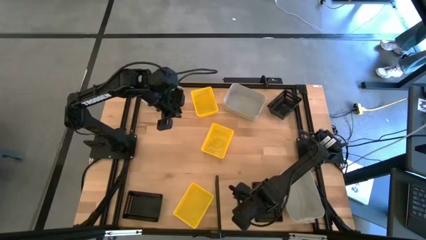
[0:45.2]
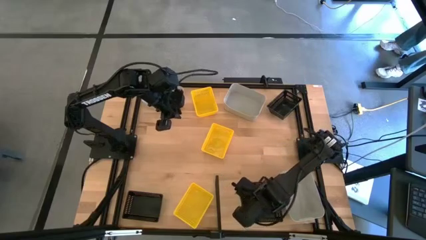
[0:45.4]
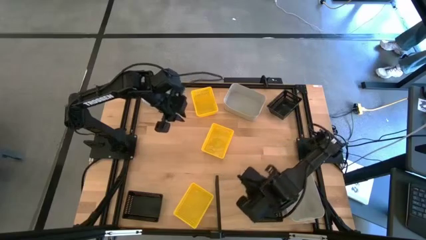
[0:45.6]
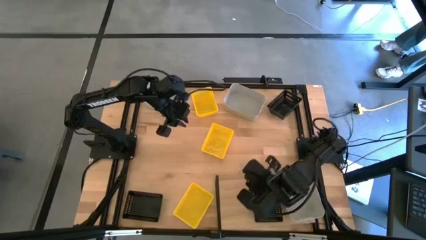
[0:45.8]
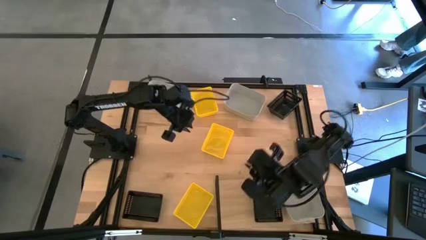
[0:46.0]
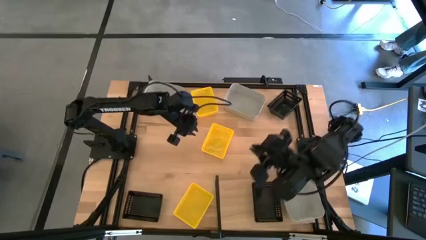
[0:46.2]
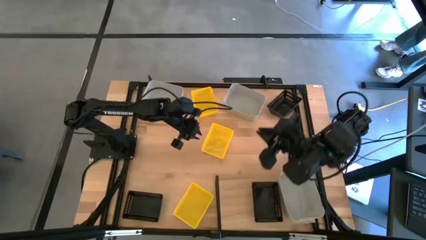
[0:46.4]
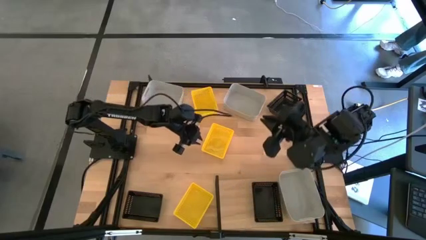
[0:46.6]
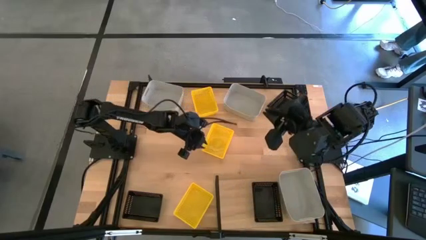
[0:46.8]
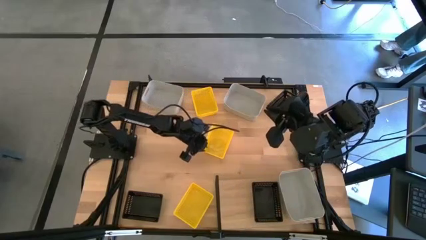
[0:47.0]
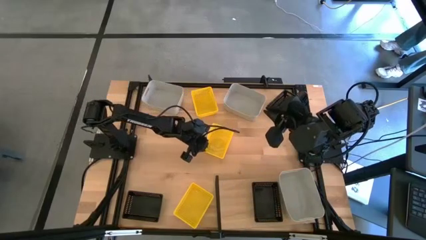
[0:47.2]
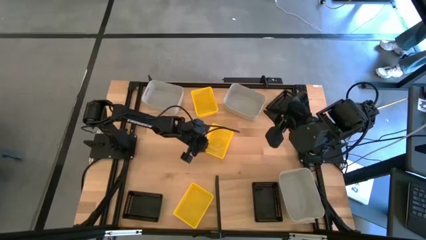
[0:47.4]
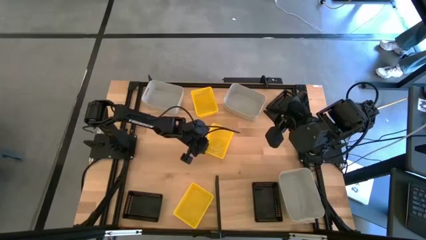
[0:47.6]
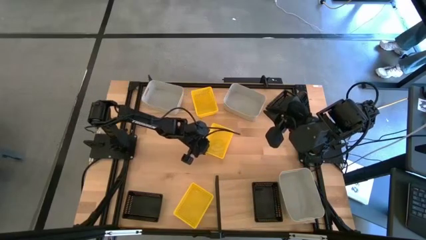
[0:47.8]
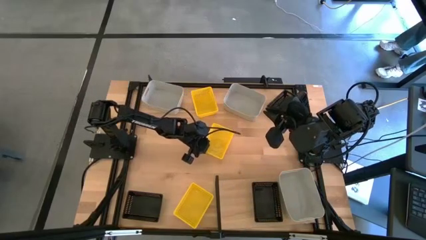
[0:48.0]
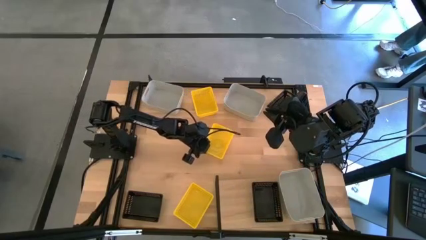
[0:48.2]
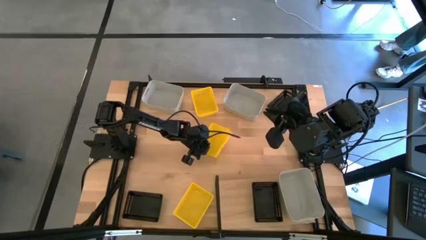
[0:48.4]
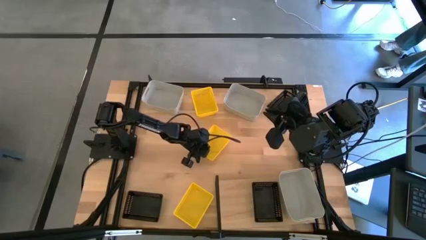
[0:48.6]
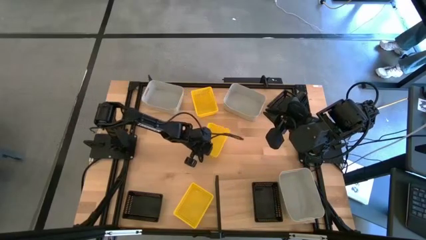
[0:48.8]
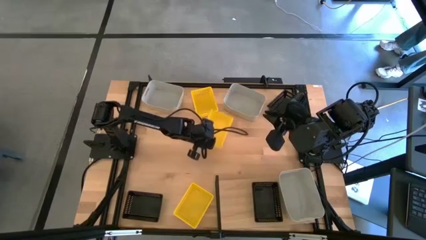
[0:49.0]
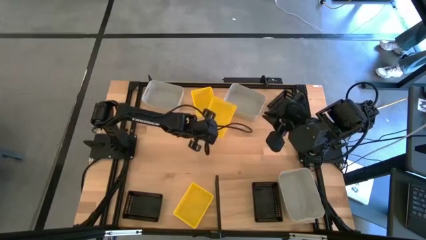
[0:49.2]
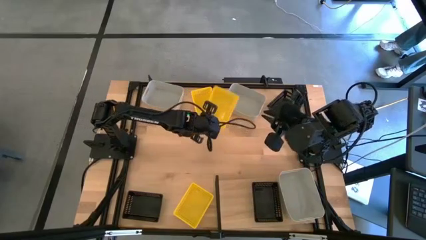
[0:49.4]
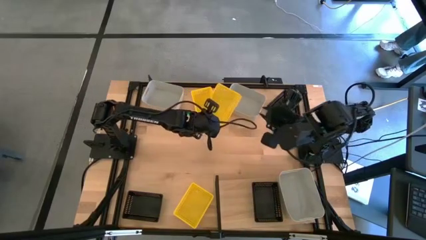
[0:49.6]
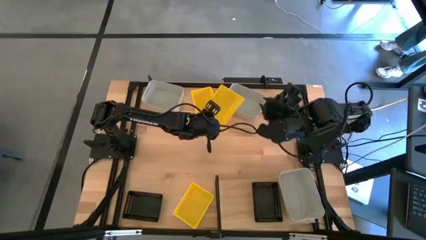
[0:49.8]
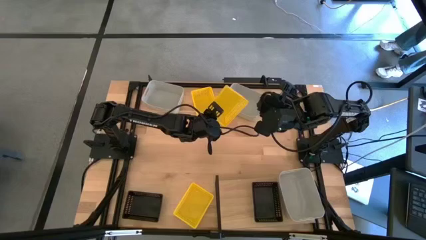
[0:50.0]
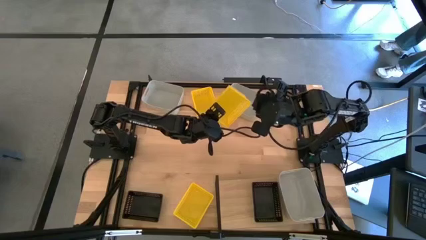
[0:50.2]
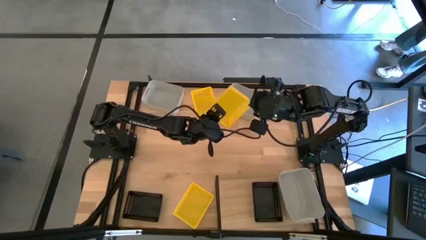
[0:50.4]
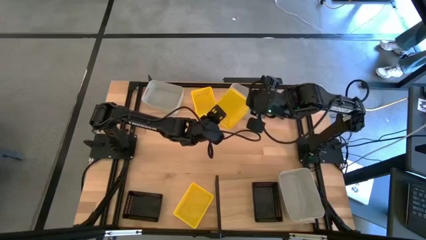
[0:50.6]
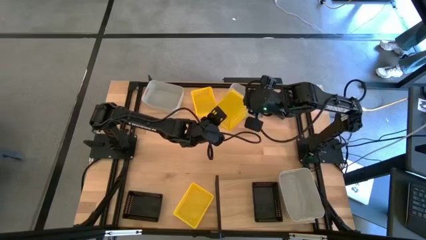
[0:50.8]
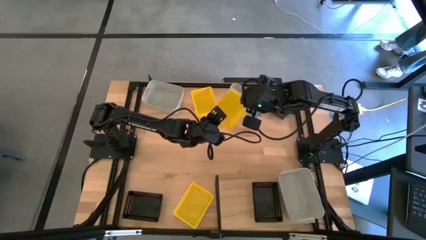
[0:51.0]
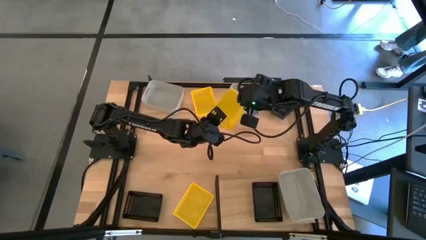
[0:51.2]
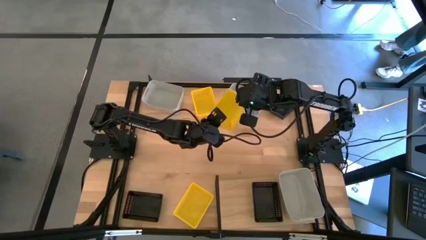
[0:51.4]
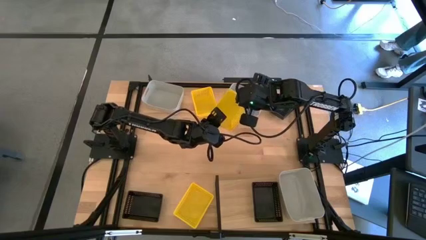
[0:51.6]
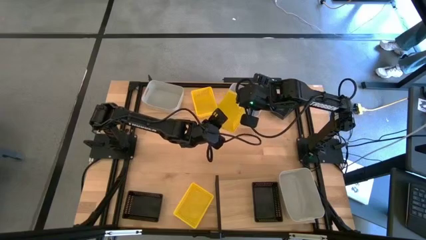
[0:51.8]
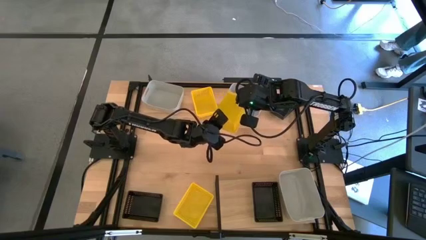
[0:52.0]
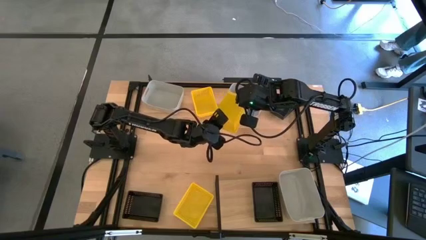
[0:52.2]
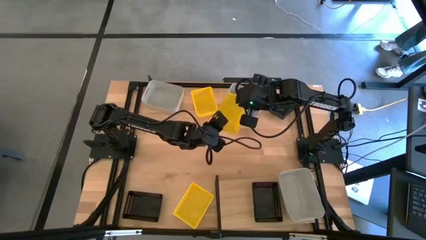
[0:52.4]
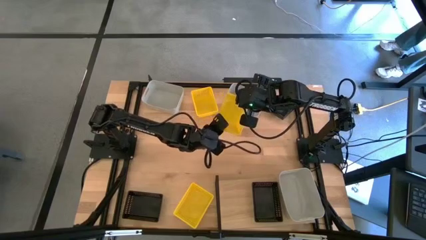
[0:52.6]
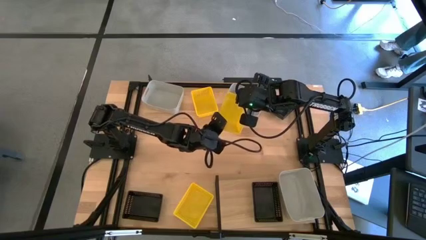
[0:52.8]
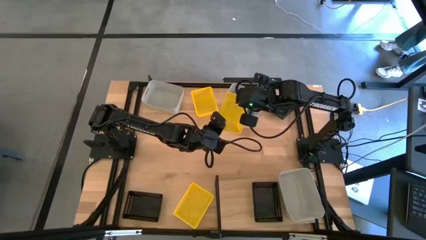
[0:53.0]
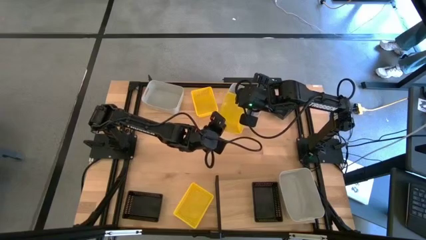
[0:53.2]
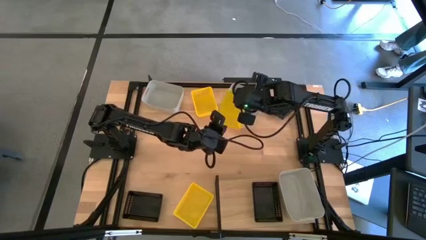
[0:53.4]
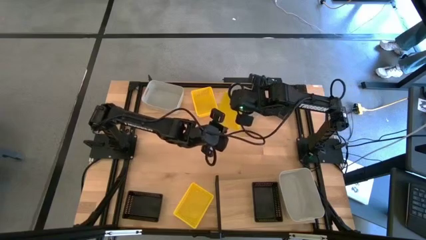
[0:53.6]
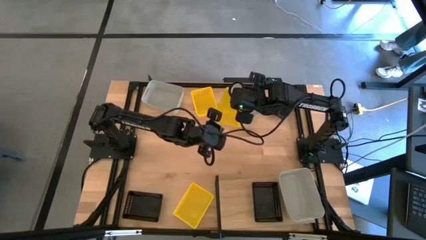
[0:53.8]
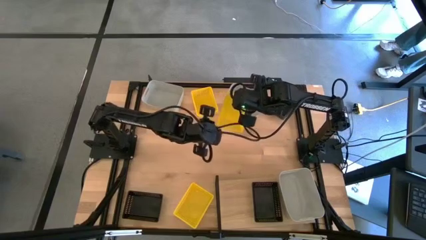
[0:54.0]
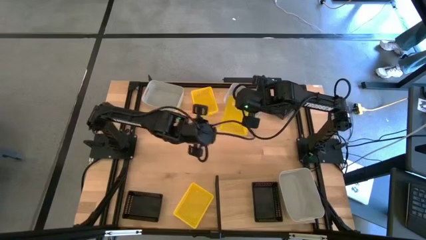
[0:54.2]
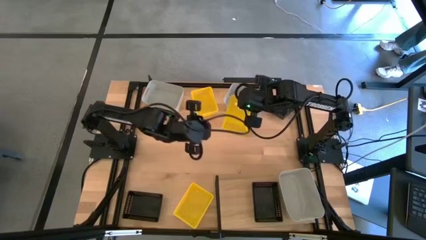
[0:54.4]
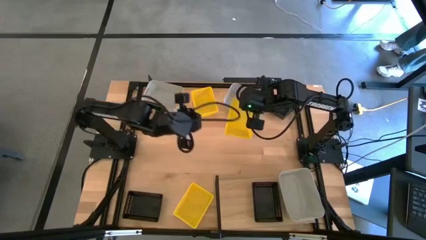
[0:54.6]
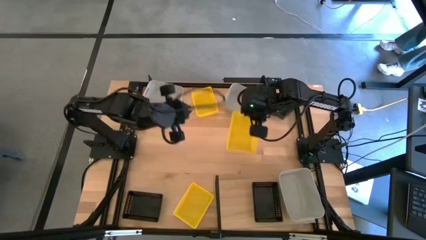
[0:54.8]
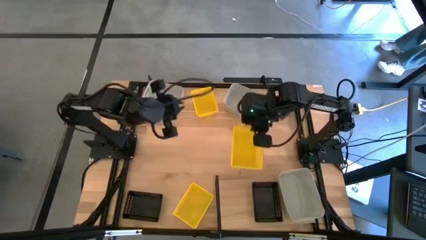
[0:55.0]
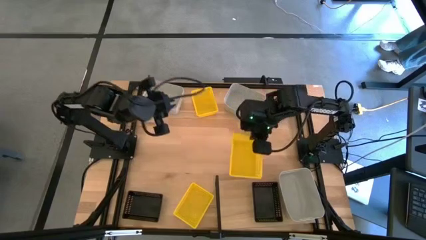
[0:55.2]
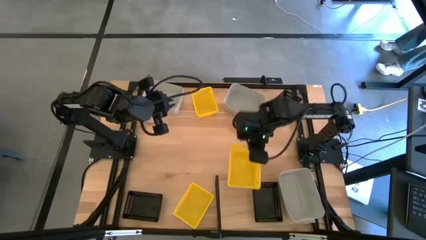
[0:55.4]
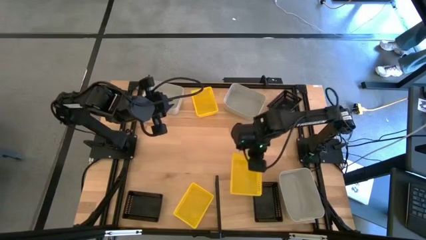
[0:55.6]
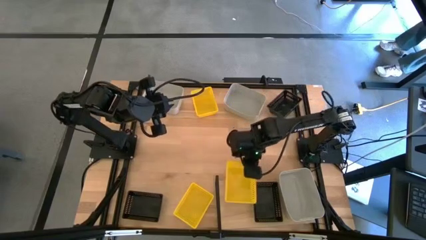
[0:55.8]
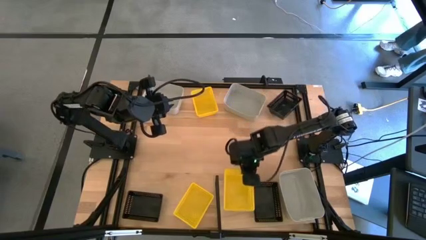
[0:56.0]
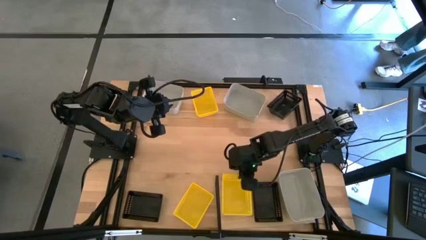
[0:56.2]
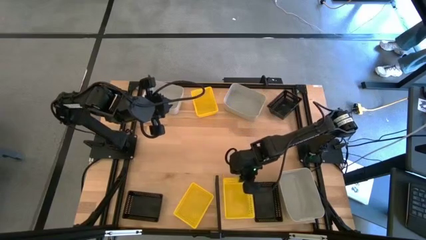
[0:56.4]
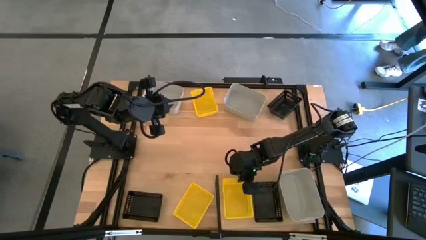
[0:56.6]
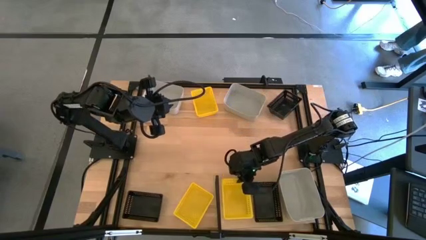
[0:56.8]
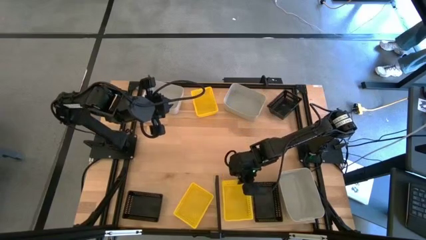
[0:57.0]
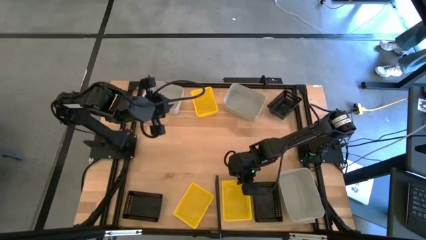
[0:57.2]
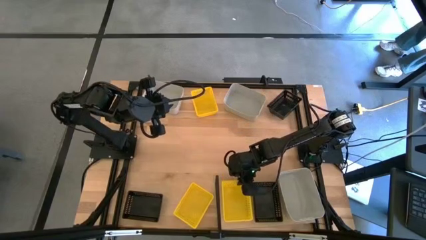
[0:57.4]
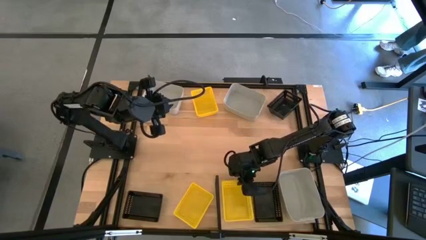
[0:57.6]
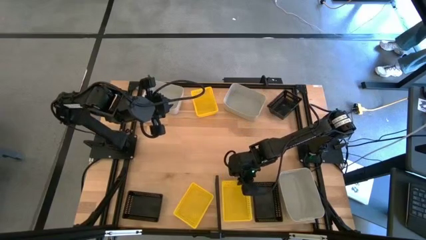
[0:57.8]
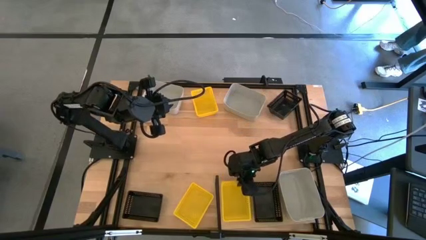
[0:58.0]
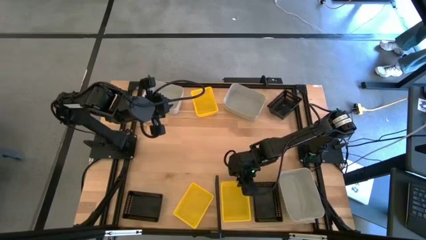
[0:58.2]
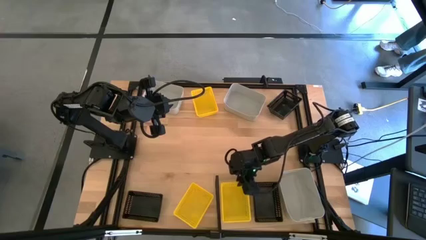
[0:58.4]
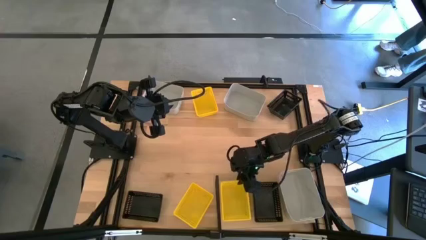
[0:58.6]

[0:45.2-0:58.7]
Task: Stack baskets on shelf by color
Put the middle yellow bin on the shelf

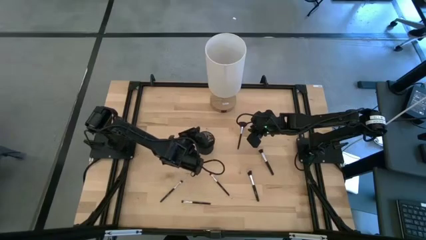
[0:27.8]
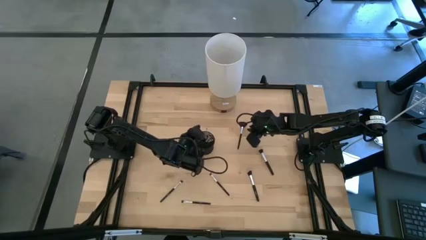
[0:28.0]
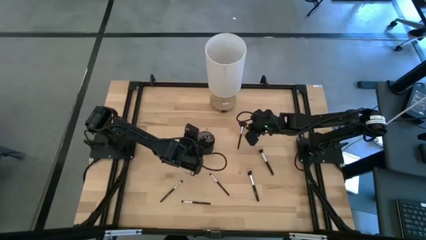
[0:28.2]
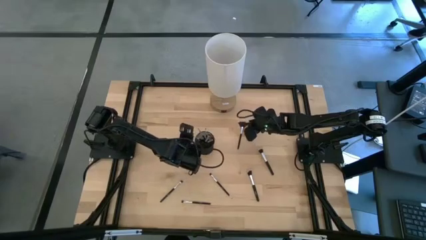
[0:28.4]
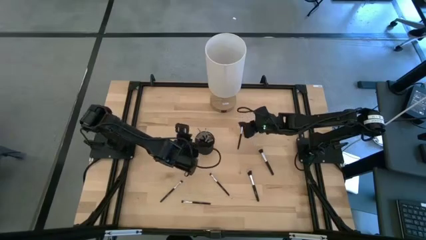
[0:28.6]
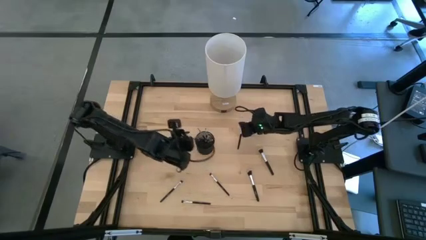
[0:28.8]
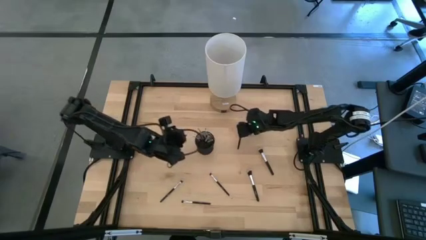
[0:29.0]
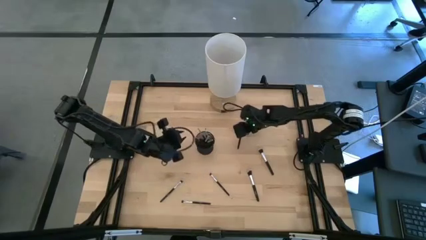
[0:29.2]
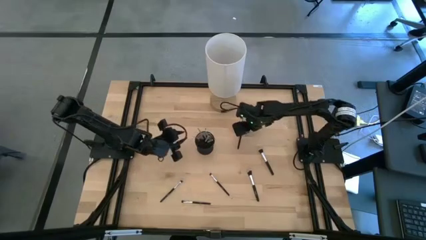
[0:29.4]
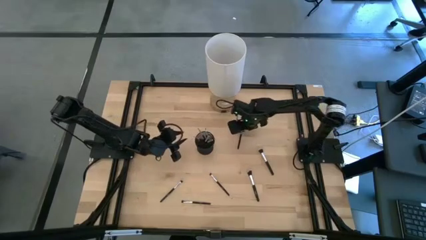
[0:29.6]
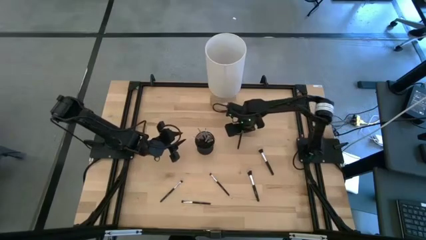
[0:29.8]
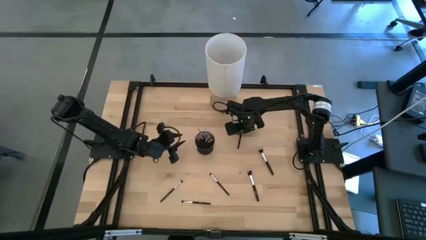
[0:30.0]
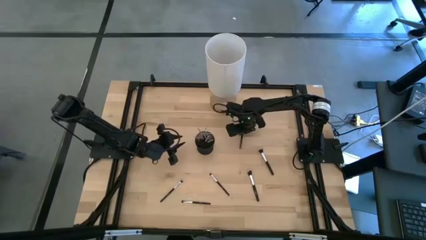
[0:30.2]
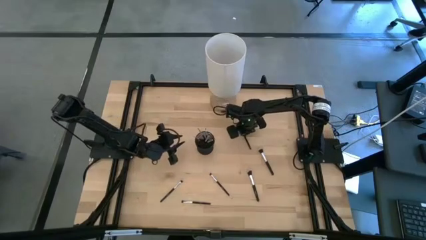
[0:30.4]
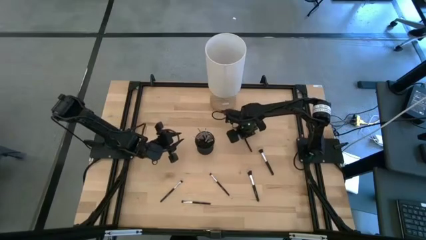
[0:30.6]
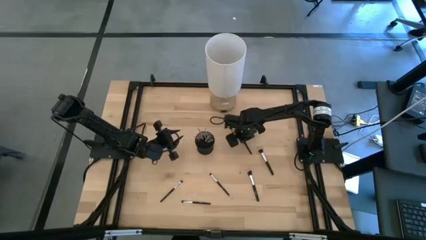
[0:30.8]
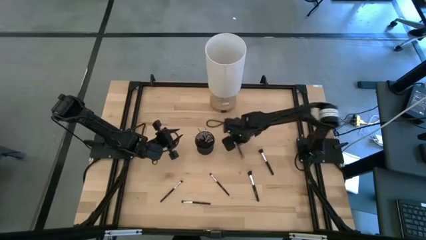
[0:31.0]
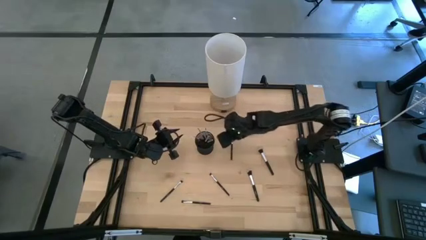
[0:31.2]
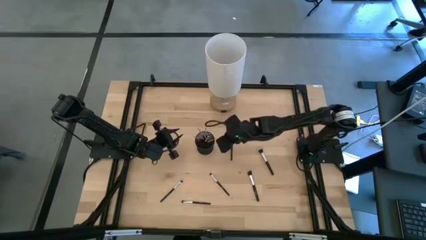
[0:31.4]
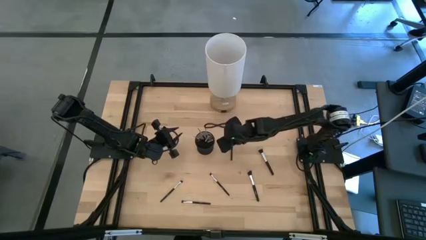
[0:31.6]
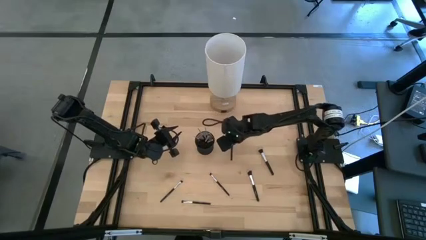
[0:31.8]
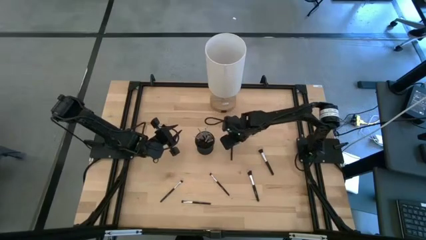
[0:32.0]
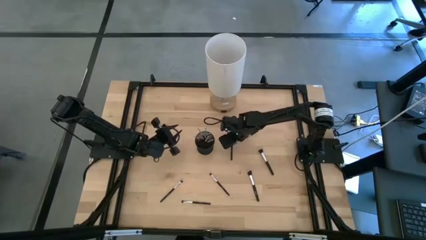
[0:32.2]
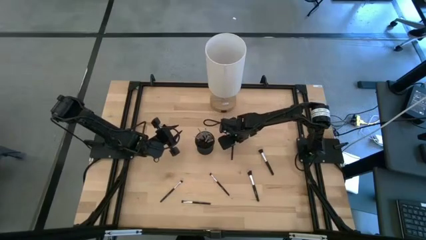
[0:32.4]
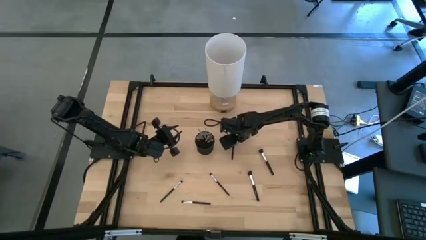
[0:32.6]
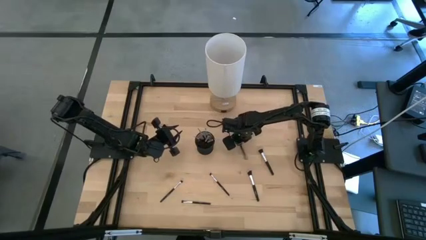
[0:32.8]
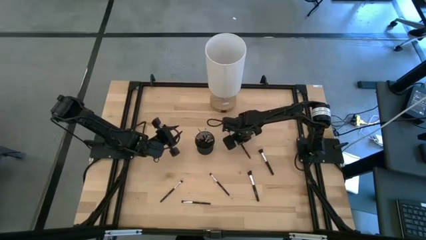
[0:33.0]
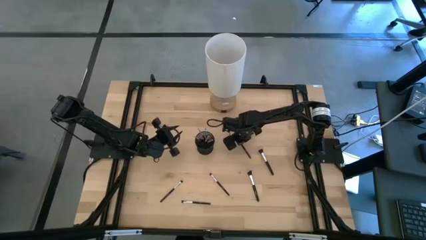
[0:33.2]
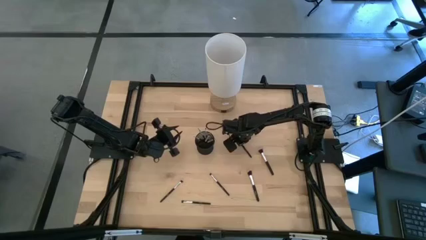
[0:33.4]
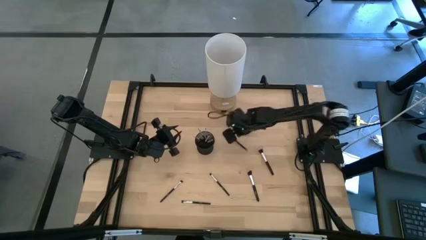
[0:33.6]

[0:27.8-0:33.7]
Task: Put items in baskets/containers
Put the highlighter brush into the holder
